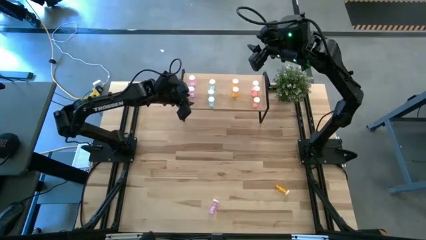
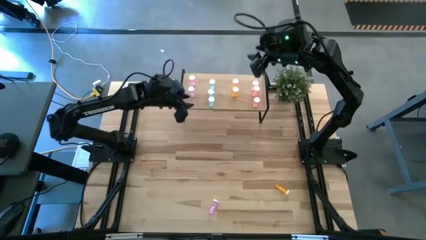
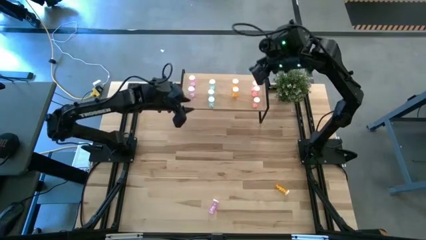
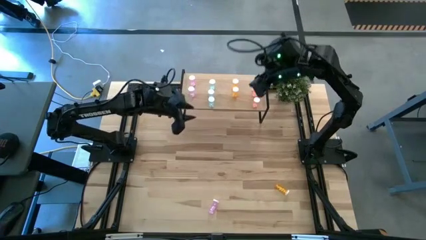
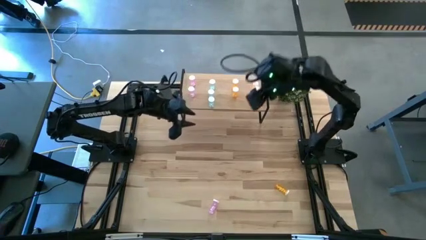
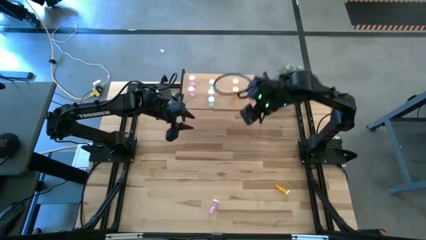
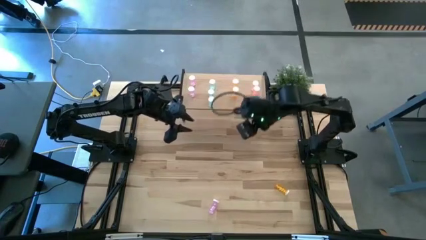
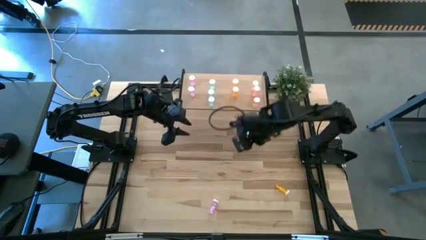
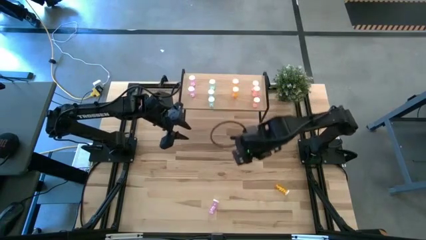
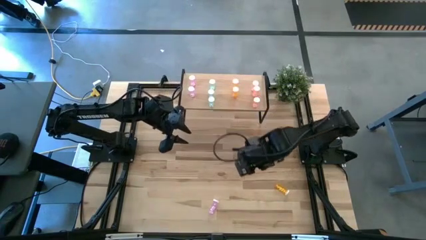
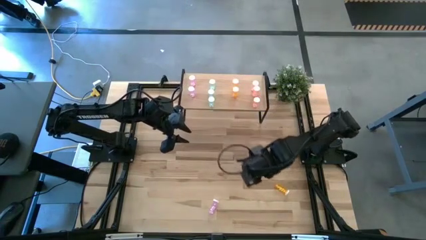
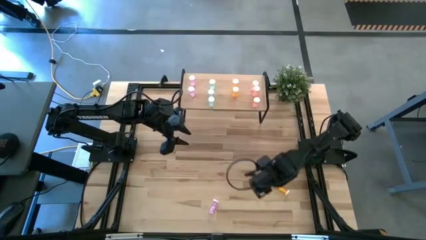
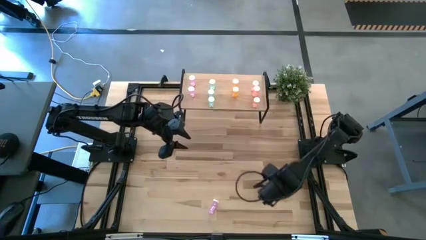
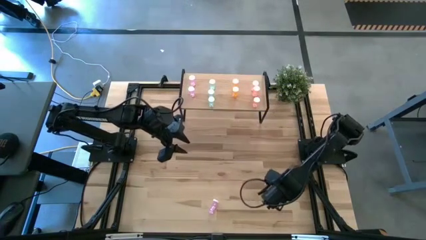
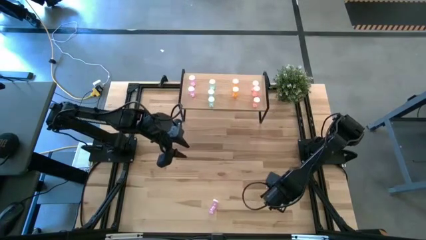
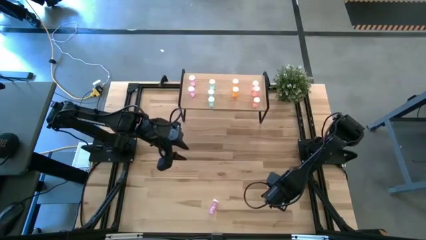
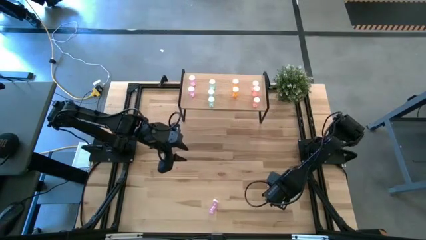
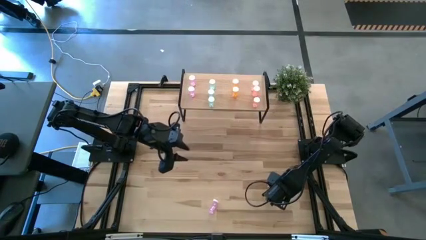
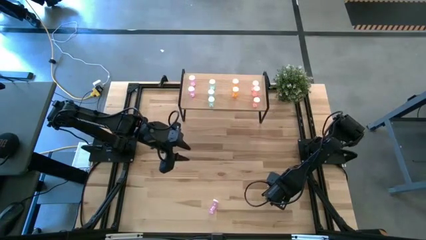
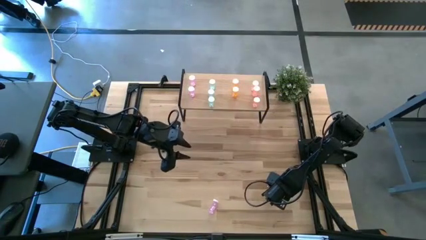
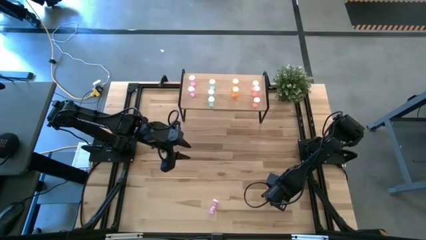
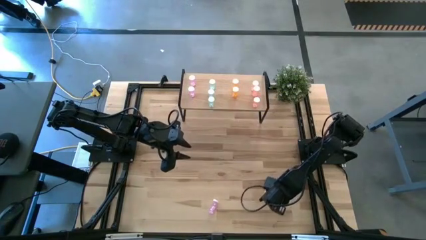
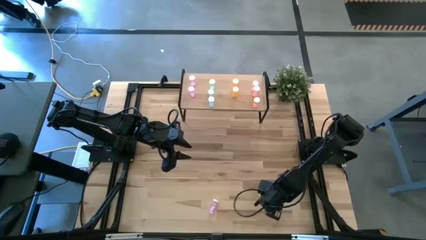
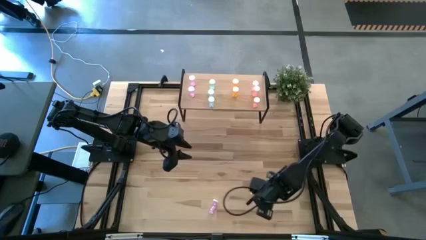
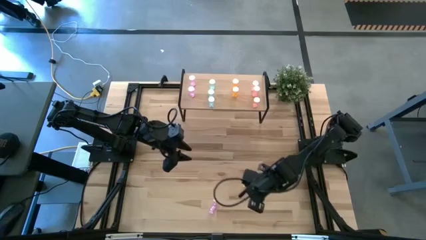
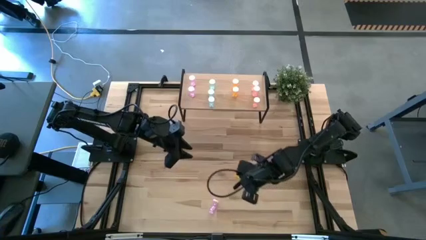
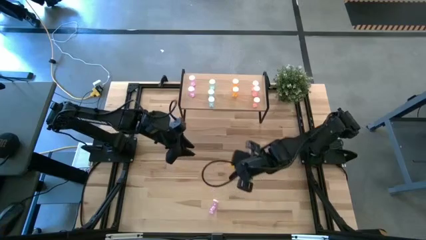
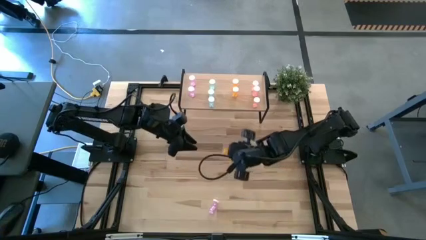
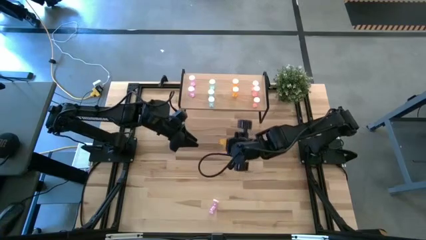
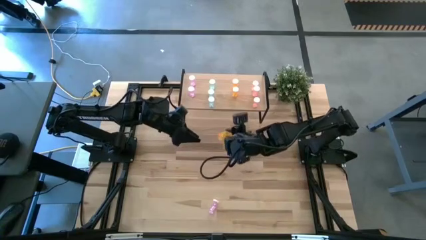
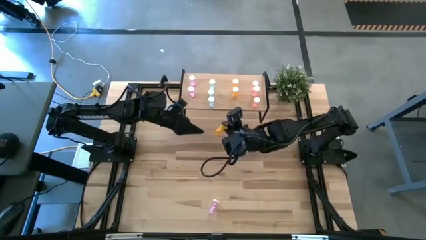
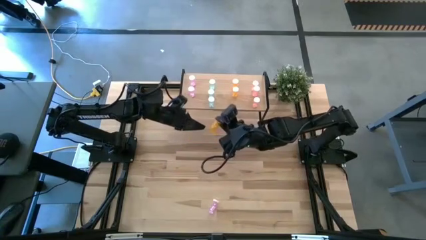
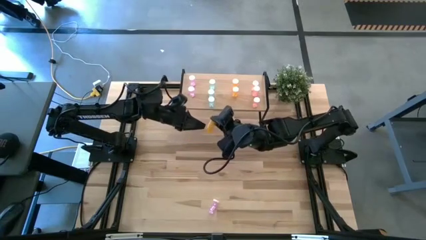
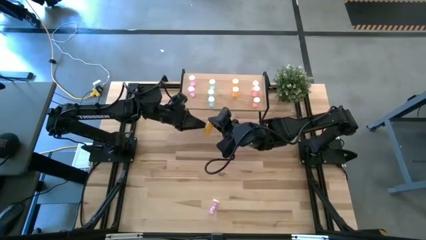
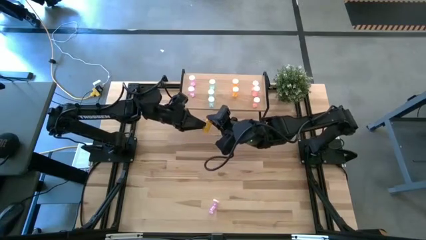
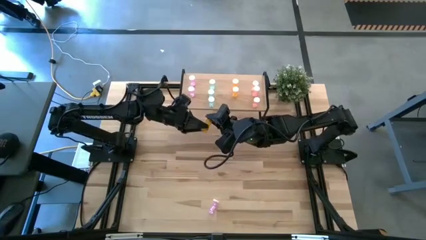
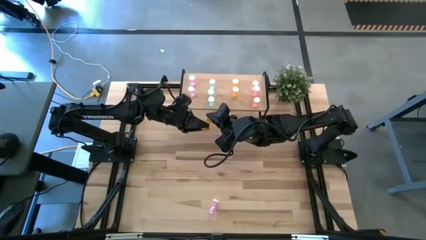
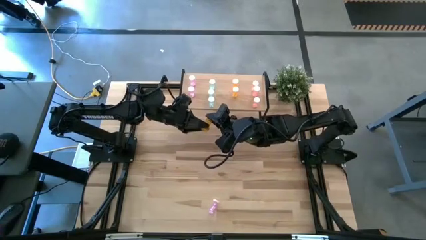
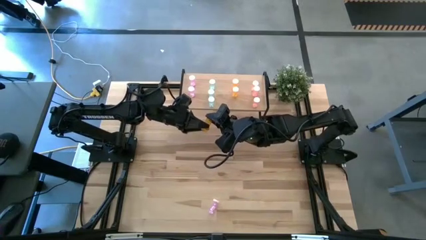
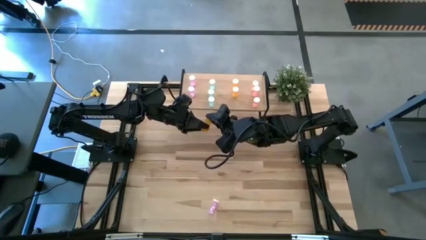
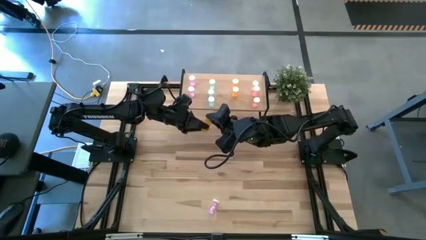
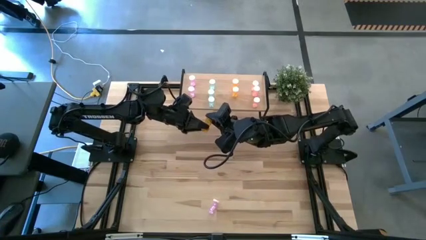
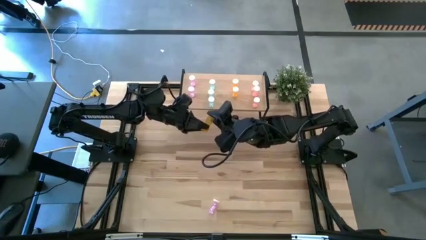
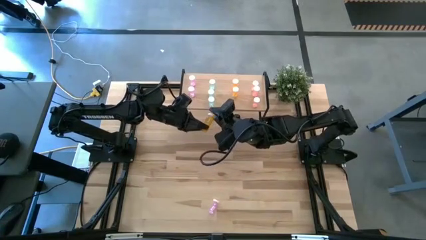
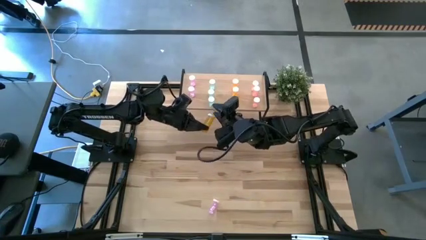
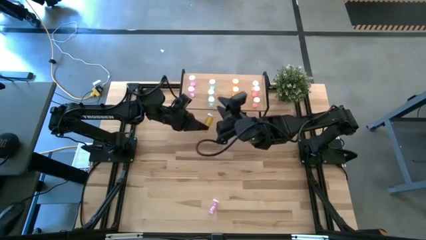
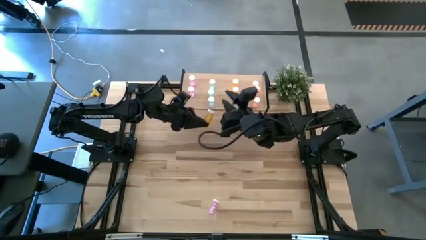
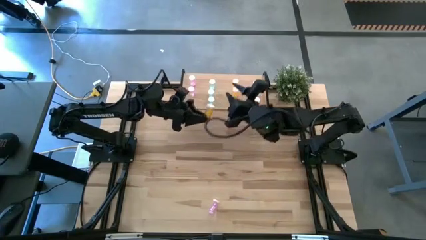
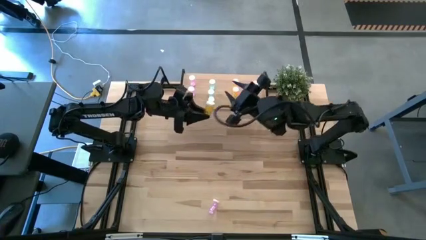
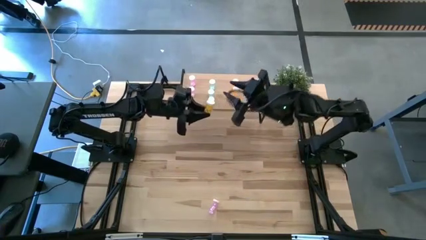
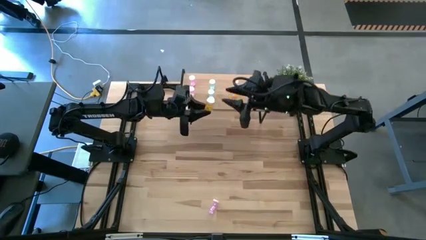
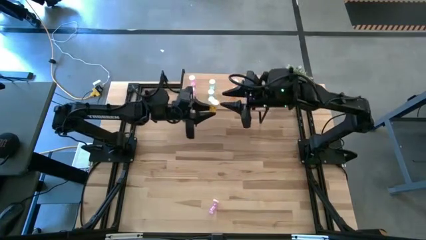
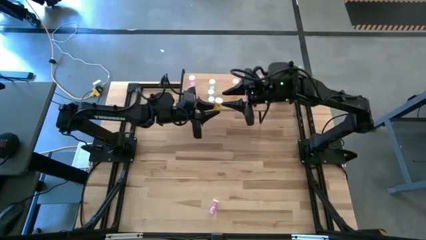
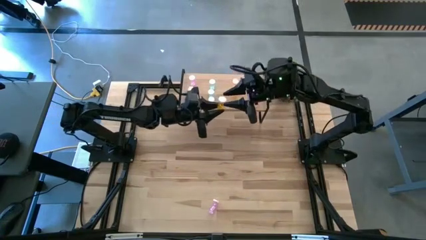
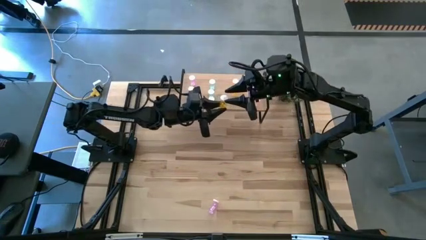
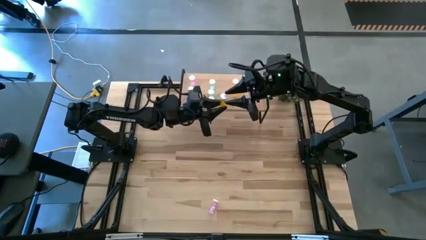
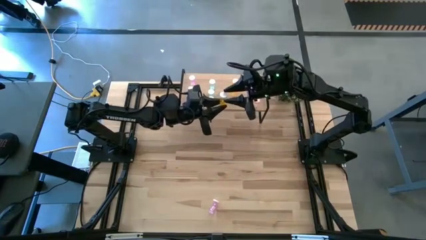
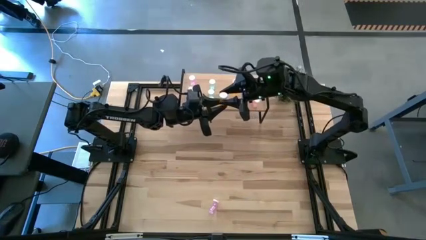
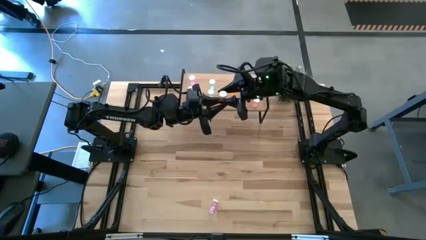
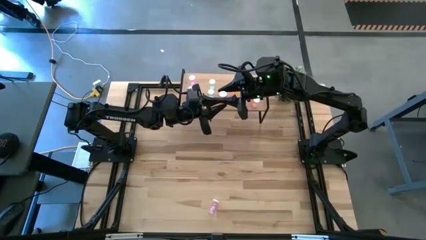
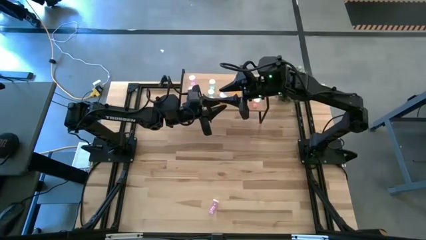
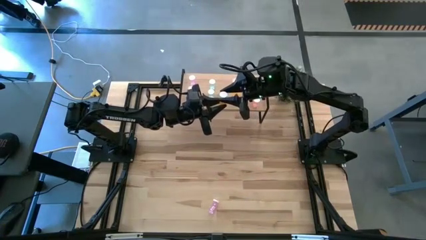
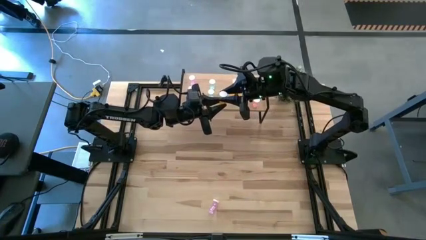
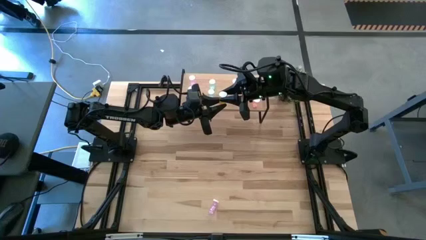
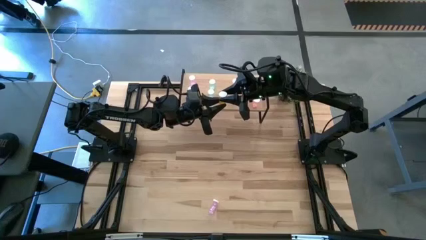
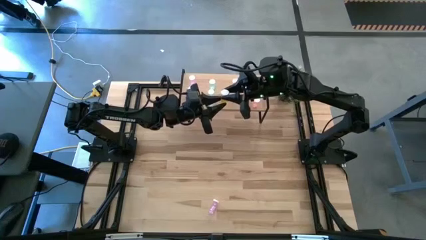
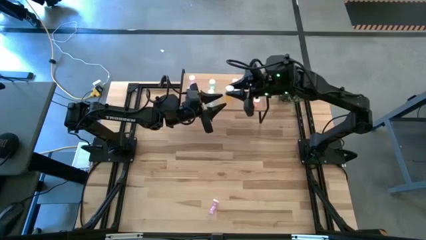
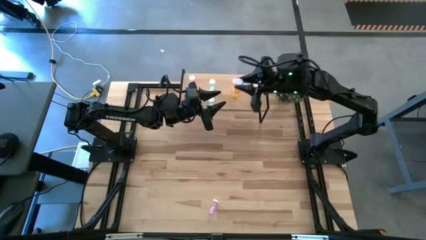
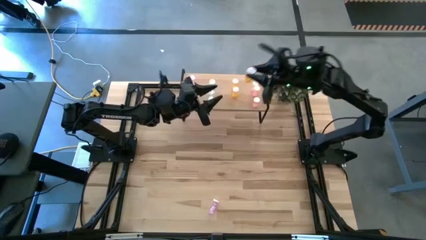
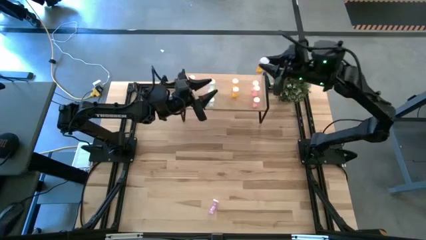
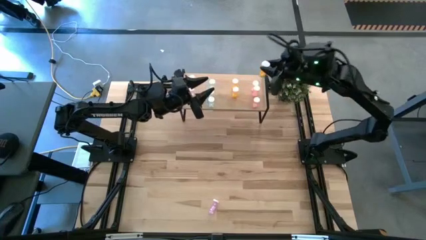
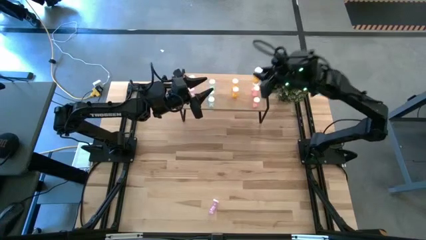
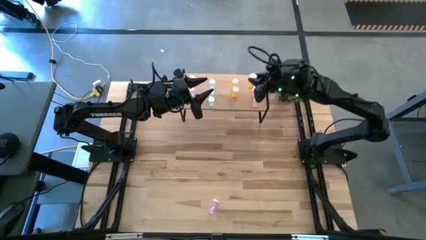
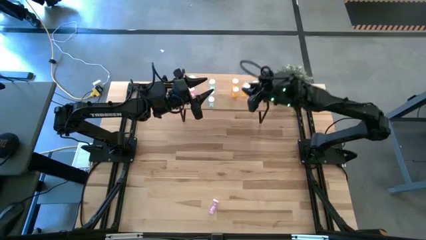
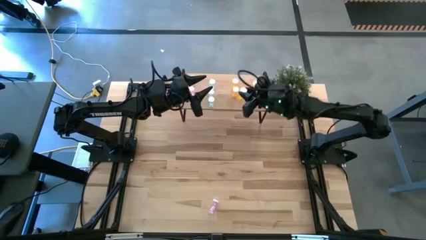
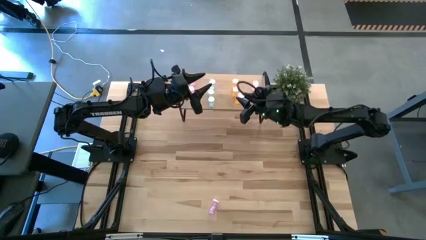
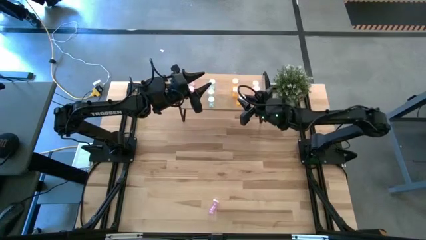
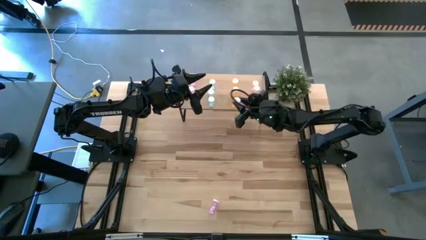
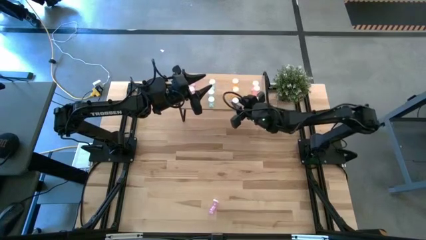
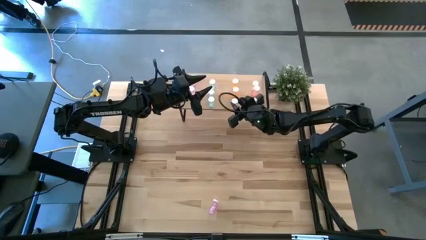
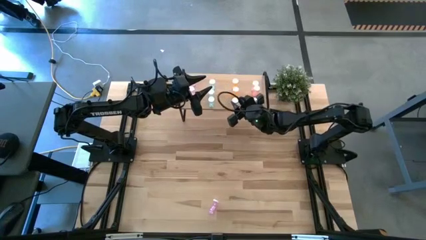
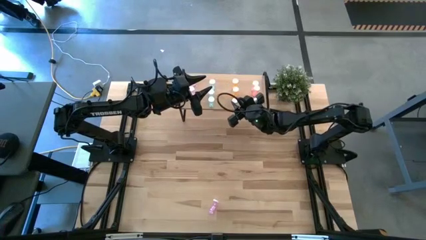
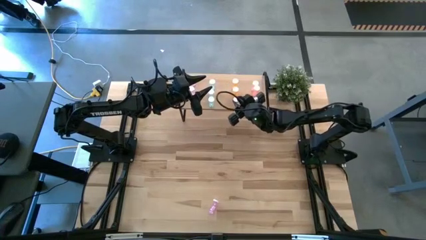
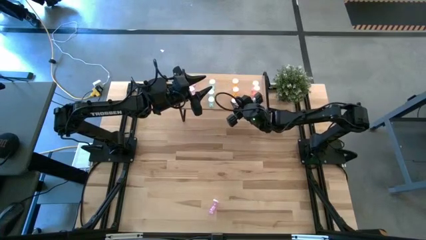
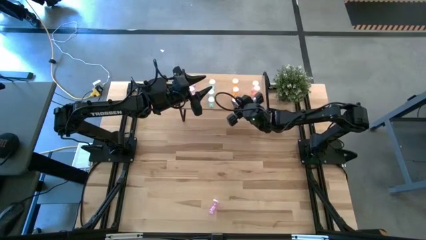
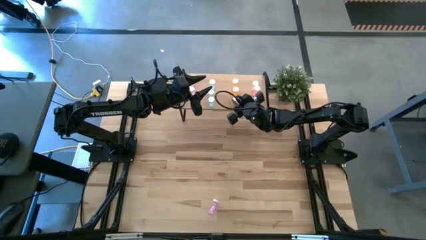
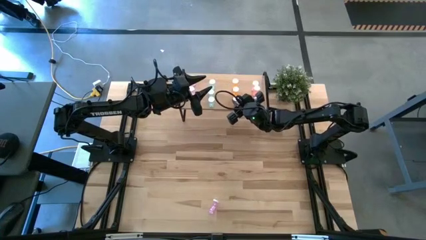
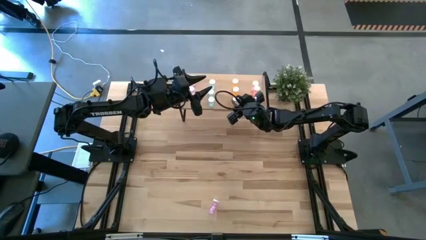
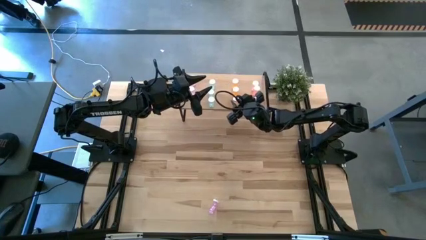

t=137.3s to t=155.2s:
Task: Pick and place medicine bottles onto shelf by color
Put the orange pill bottle on the shelf aligned with the other orange pill bottles
